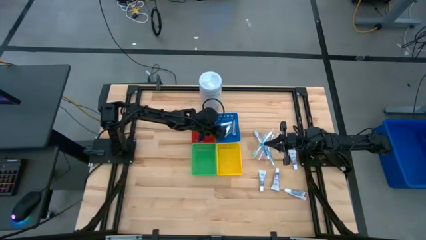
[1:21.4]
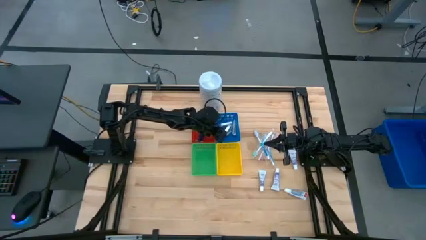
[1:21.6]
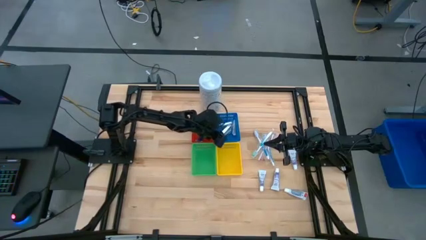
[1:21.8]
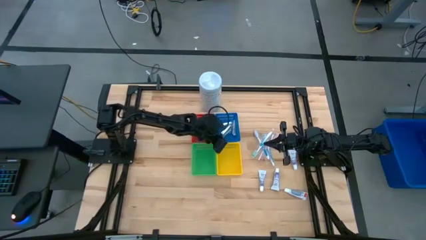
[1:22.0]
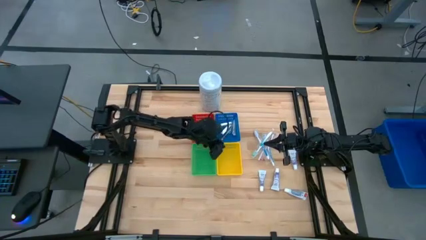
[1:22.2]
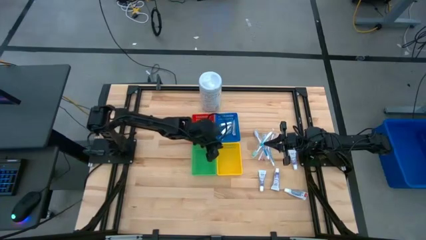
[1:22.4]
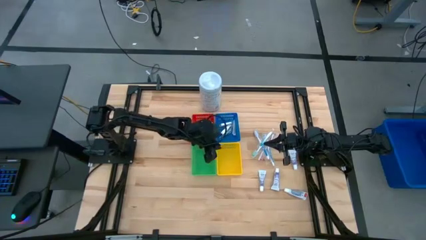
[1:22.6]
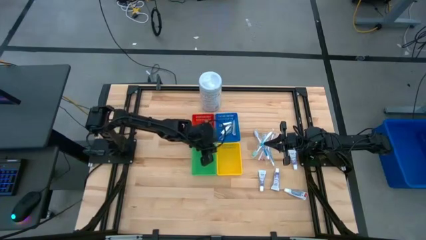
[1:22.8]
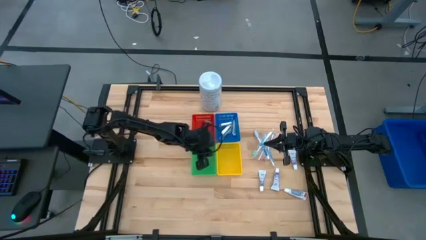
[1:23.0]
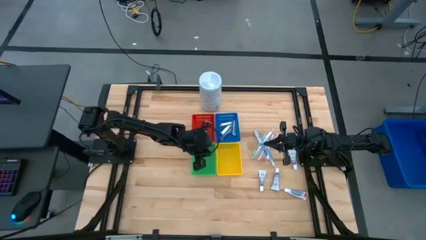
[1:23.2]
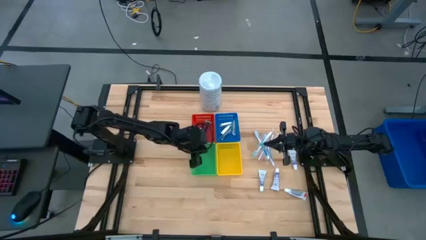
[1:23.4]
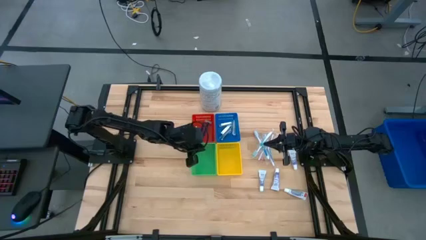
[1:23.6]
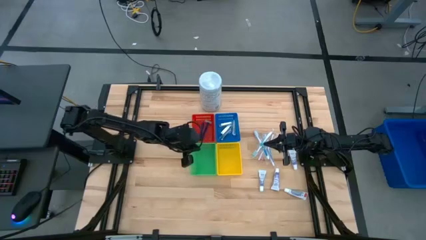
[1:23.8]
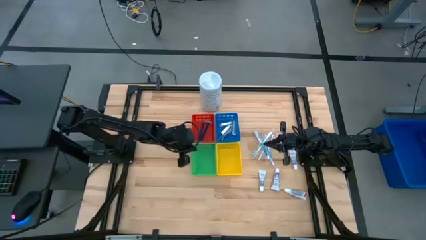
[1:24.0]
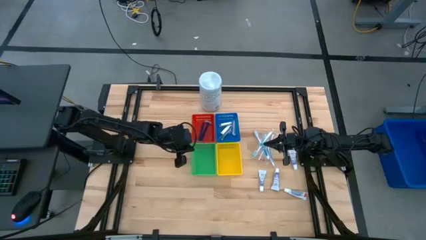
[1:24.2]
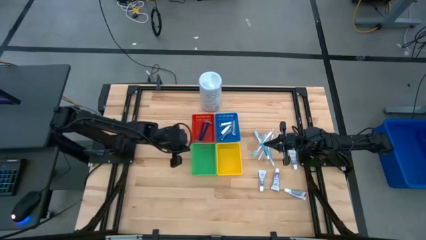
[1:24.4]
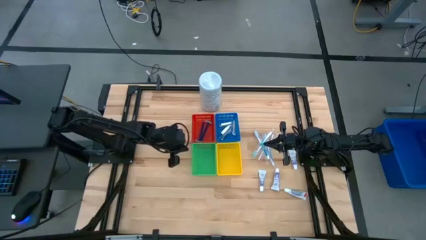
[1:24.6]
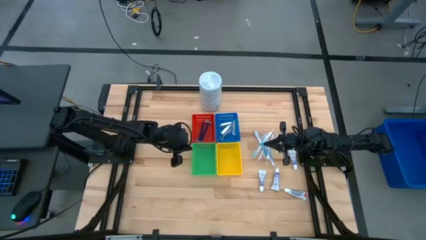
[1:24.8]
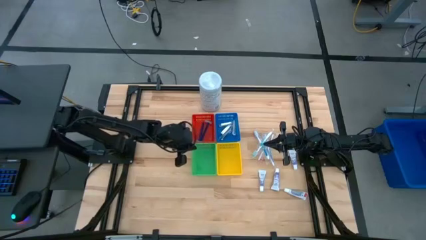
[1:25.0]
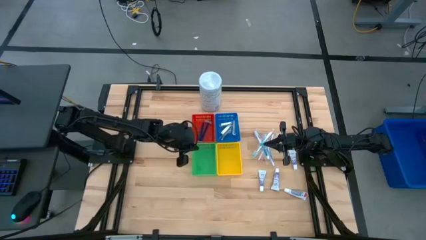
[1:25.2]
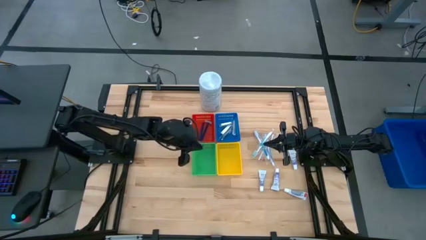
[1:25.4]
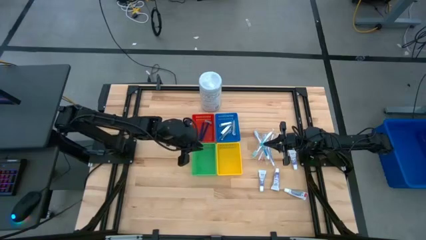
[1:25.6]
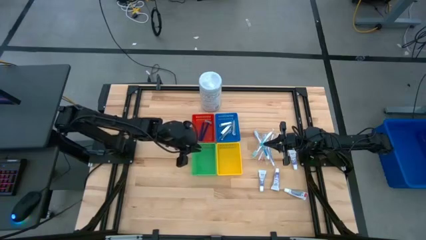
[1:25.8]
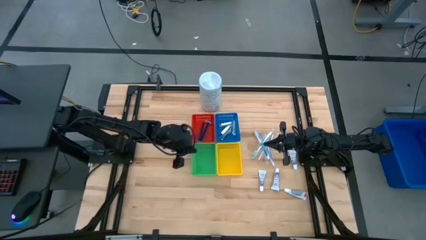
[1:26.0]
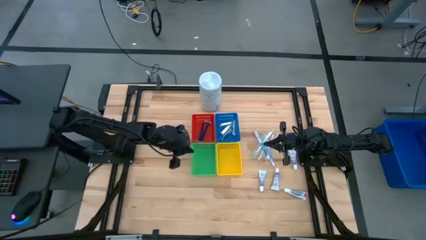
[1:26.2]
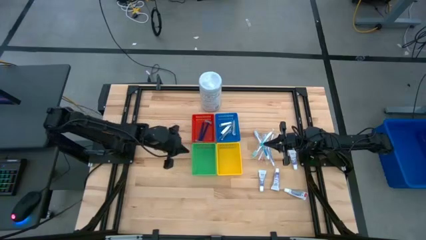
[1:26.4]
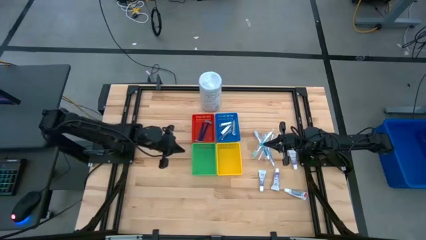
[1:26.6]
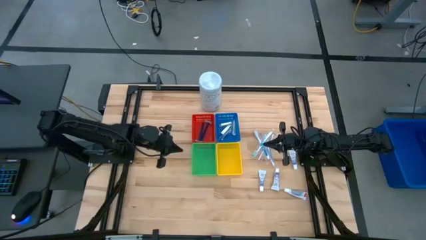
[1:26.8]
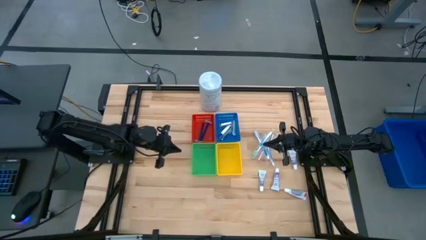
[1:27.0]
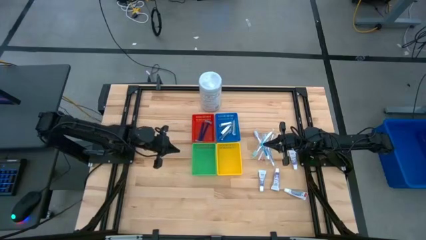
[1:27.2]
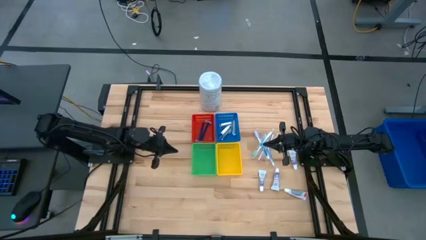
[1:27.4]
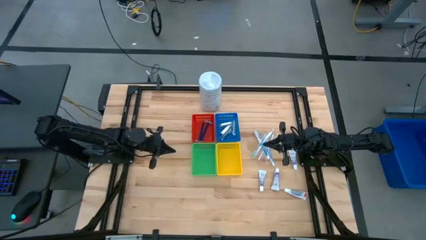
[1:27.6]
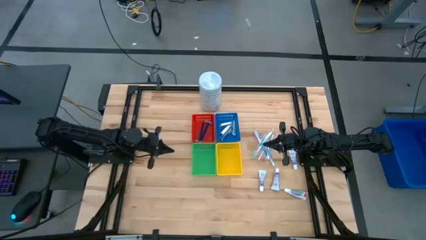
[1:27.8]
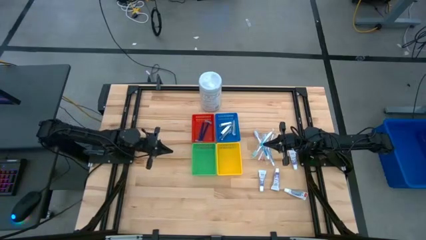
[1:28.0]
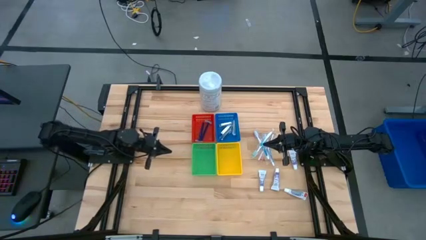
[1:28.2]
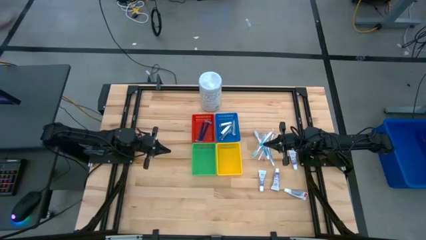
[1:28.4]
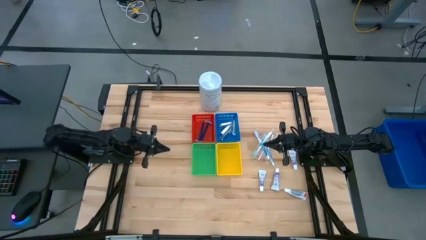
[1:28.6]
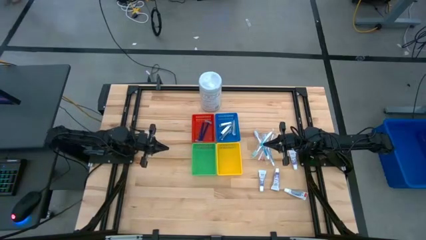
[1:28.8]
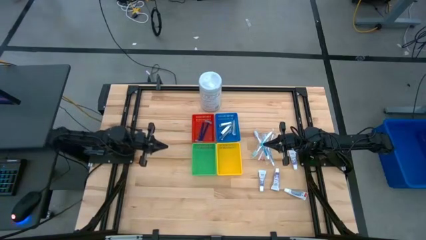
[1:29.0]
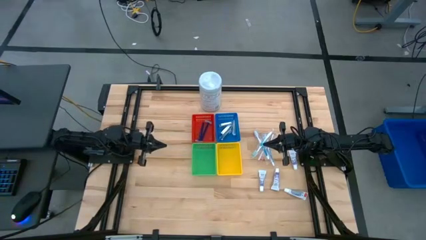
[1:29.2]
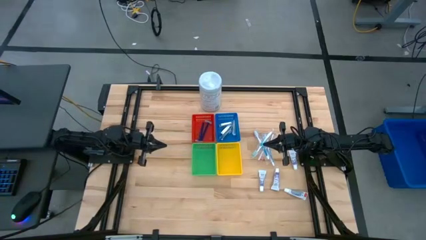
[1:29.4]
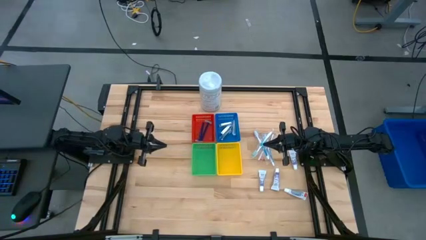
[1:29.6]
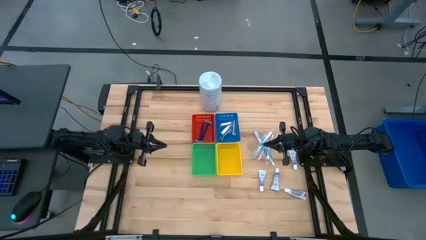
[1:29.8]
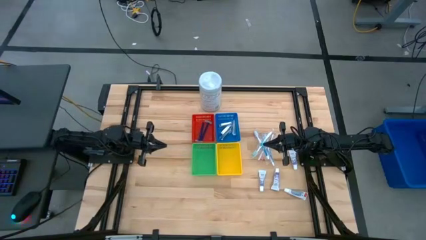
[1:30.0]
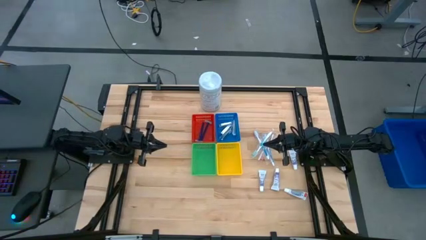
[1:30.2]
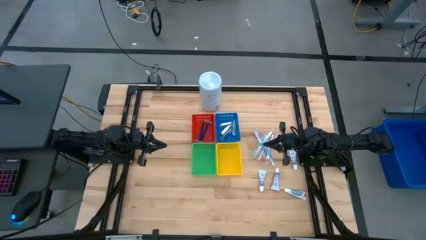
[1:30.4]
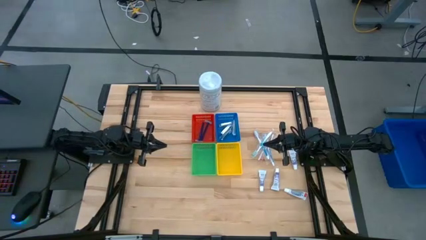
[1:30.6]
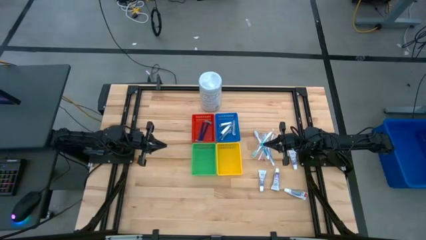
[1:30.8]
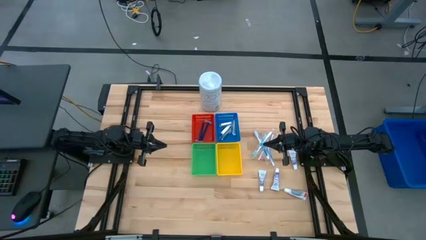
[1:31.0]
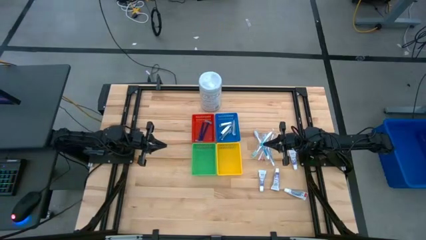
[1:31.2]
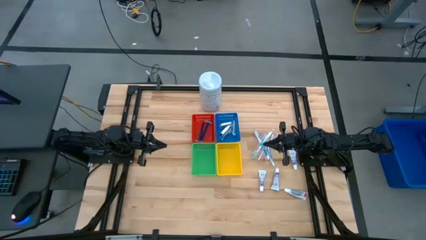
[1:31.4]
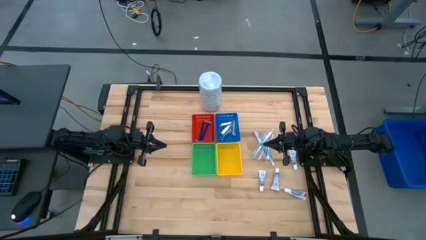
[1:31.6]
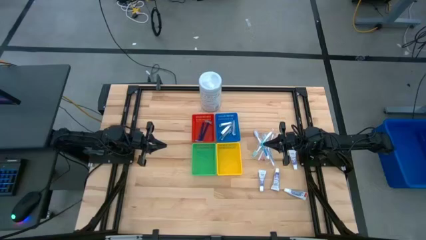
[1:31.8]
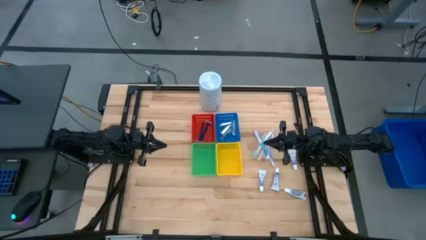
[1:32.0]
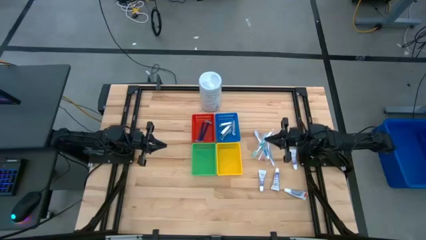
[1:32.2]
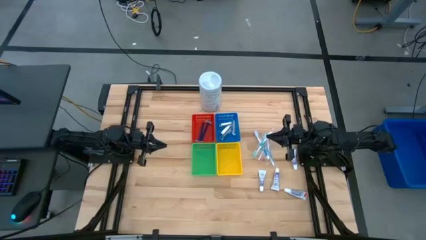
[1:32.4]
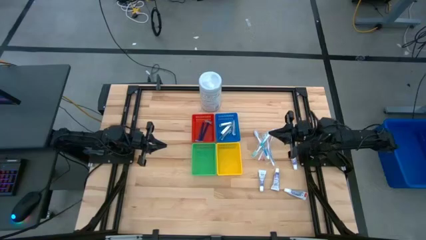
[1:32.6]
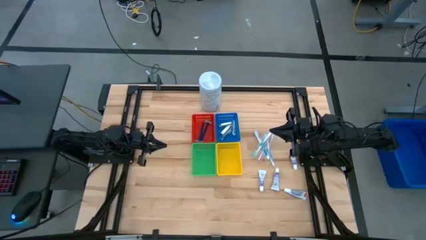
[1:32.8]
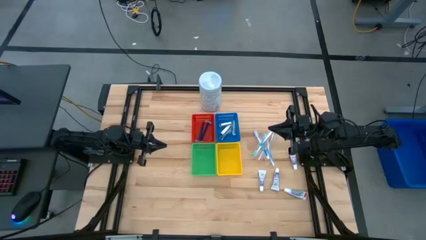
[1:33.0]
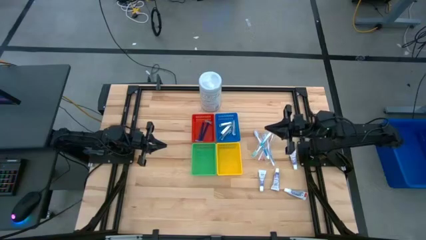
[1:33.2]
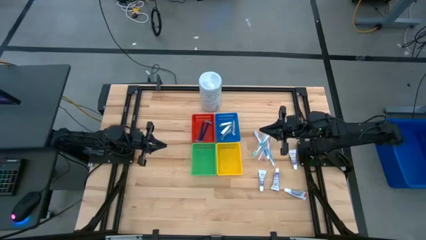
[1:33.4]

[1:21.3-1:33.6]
Task: Pick & Place Travel size toiletries
Put the green toothbrush into the green bin

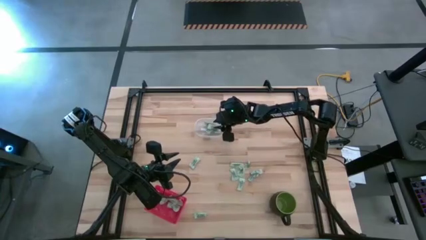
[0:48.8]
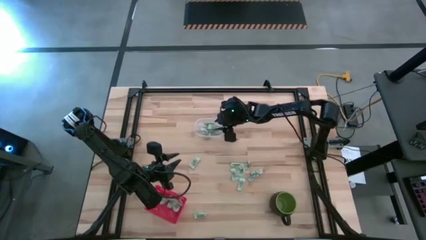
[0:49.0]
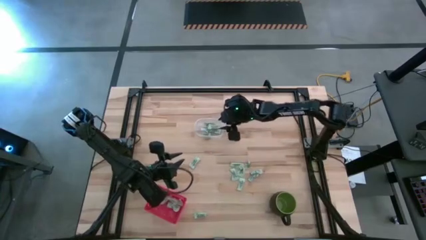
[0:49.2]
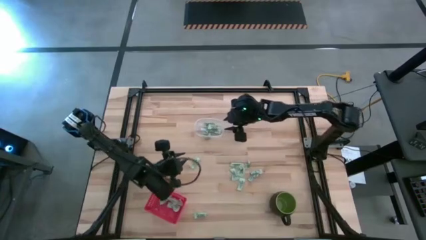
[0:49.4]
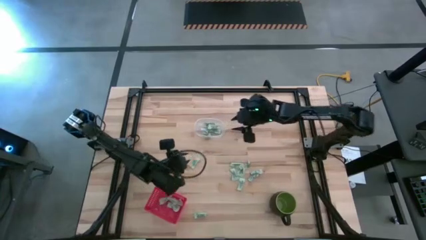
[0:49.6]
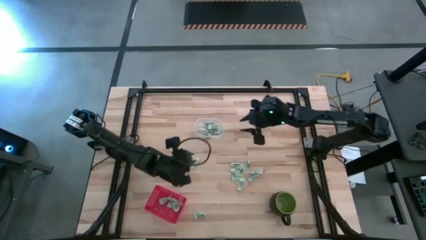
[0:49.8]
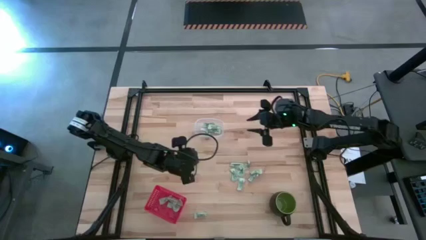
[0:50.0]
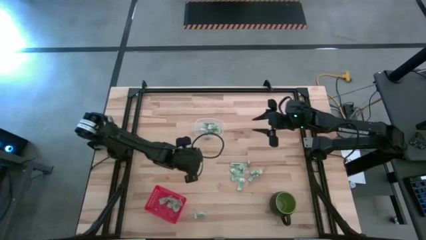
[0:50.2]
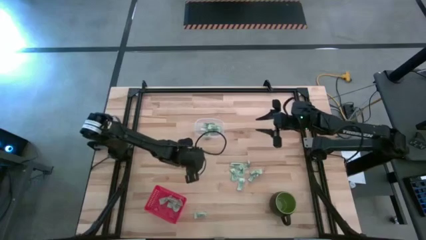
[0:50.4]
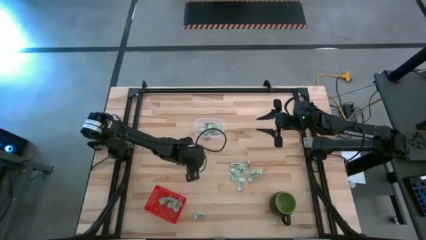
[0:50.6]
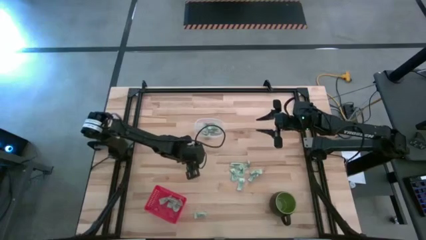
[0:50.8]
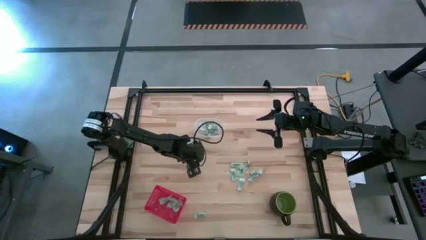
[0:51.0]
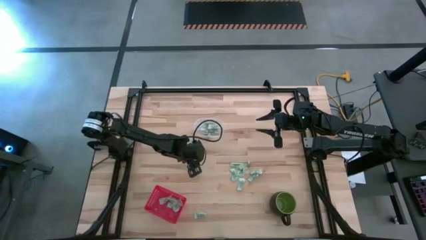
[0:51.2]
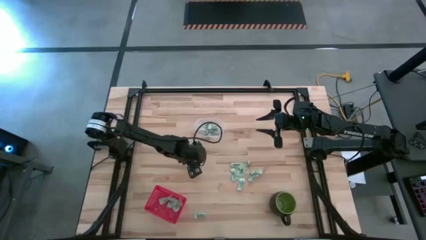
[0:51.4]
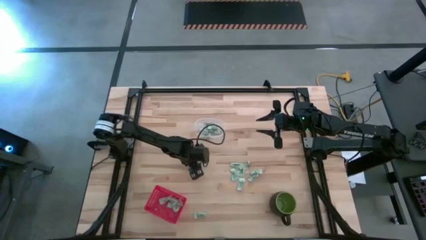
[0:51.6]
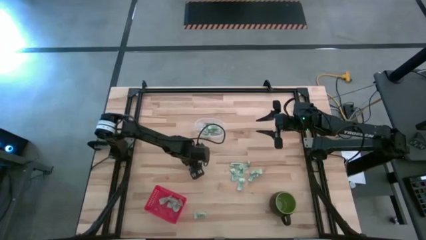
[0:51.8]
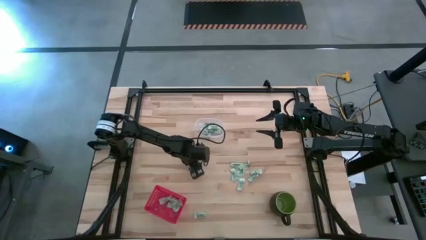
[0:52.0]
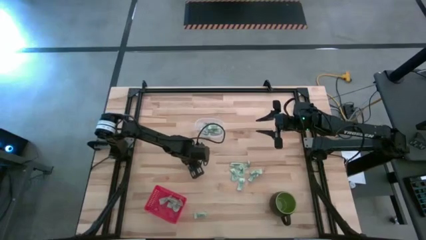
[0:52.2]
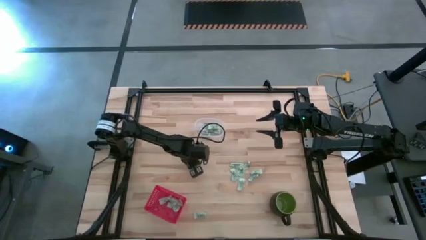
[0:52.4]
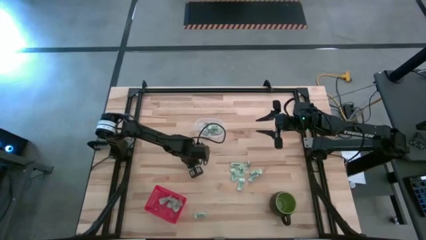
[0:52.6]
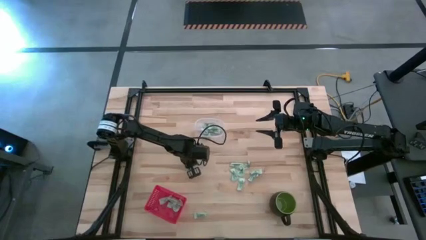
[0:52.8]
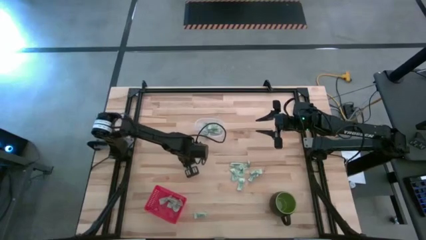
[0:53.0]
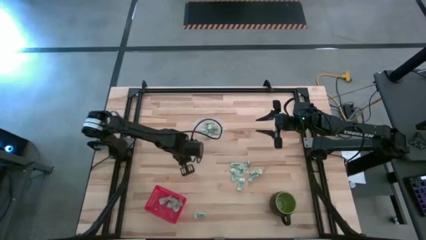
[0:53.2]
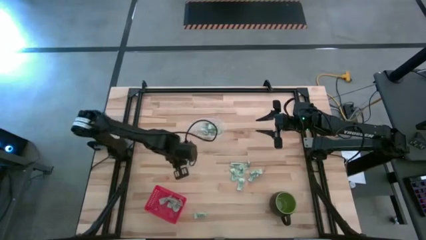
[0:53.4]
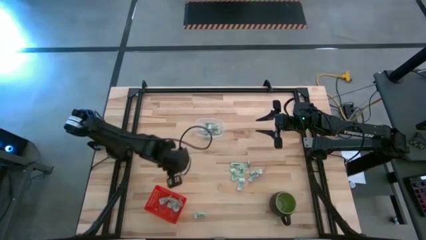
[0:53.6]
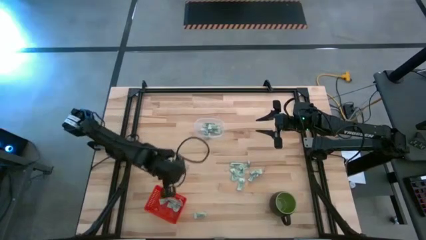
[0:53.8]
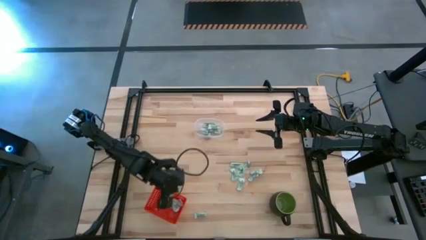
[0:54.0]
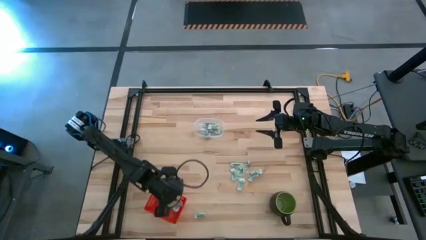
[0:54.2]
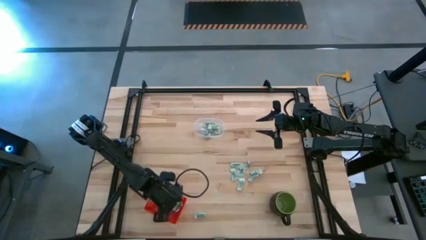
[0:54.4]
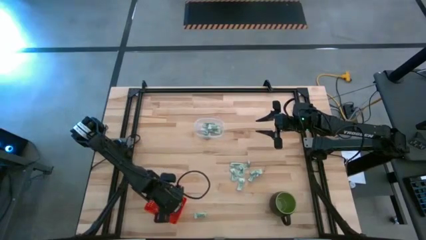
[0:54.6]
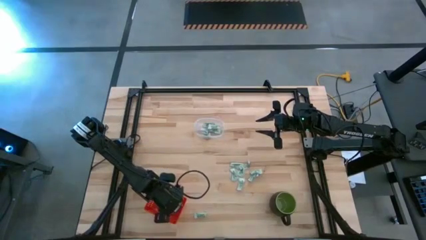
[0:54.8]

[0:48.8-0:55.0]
Task: Pick and place items into bin
Put the stevia packet into the orange bin
